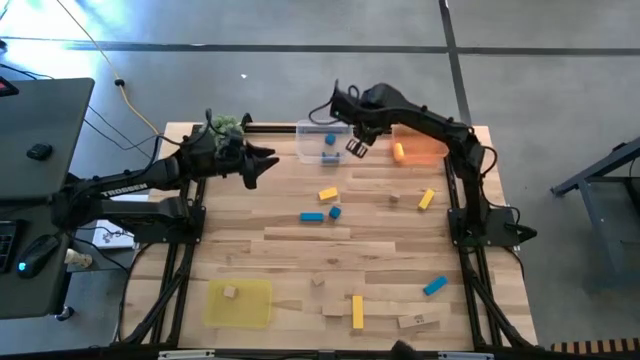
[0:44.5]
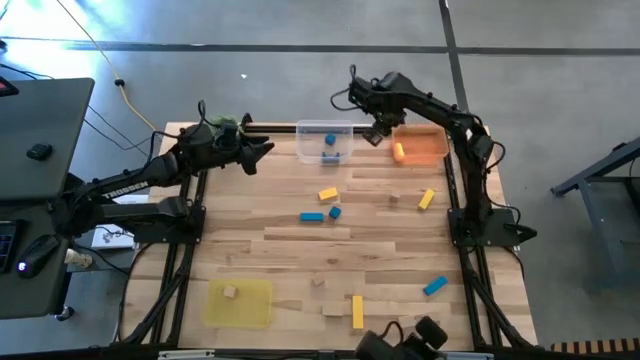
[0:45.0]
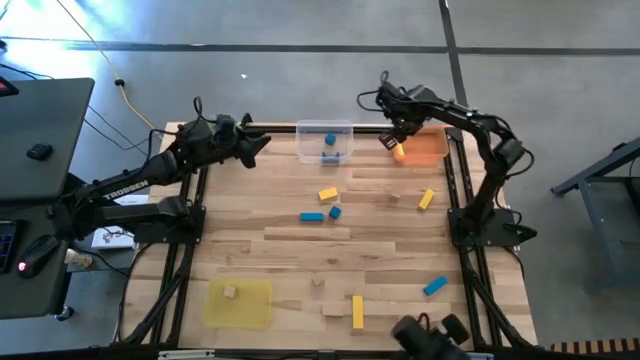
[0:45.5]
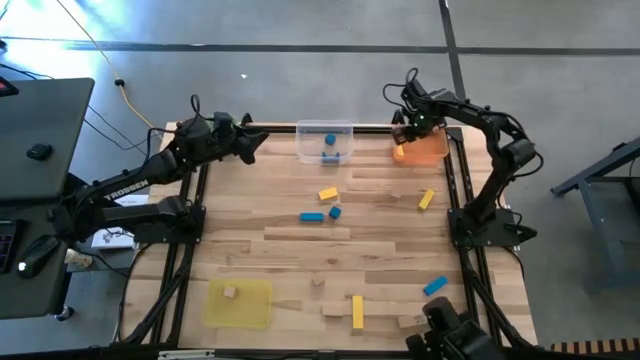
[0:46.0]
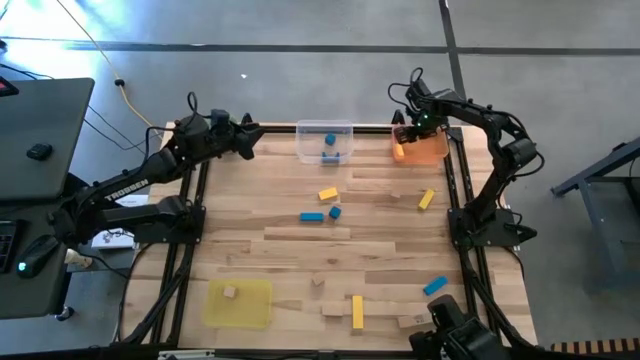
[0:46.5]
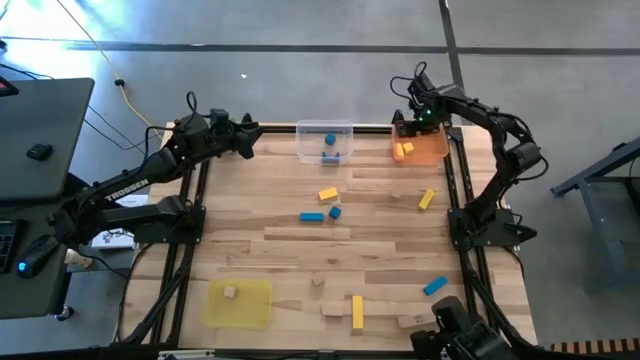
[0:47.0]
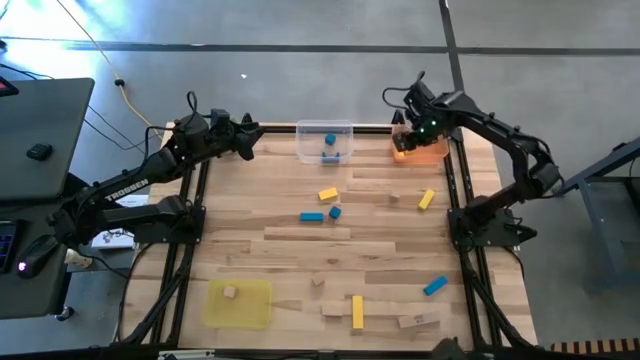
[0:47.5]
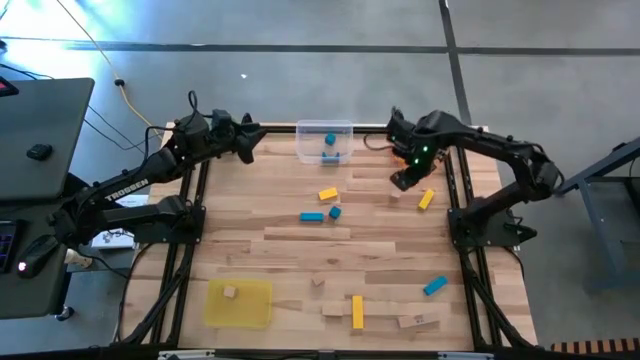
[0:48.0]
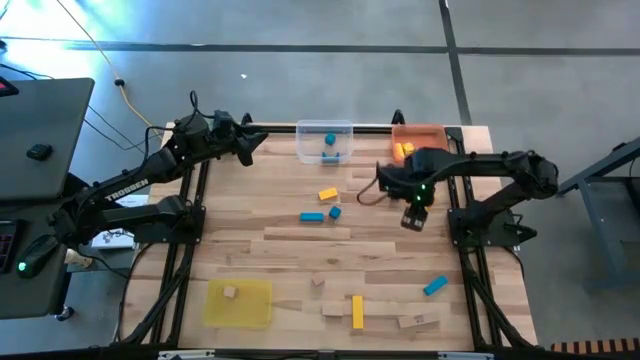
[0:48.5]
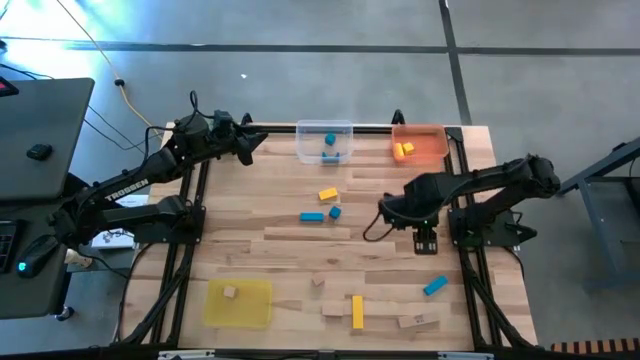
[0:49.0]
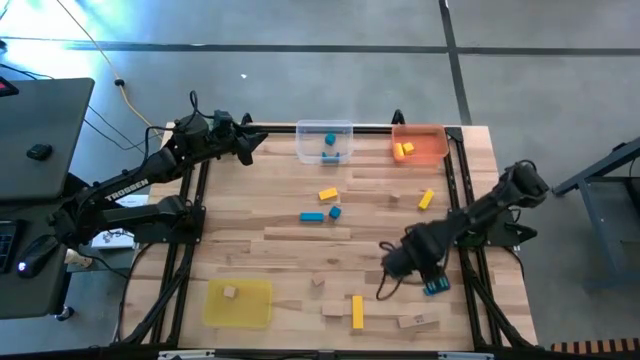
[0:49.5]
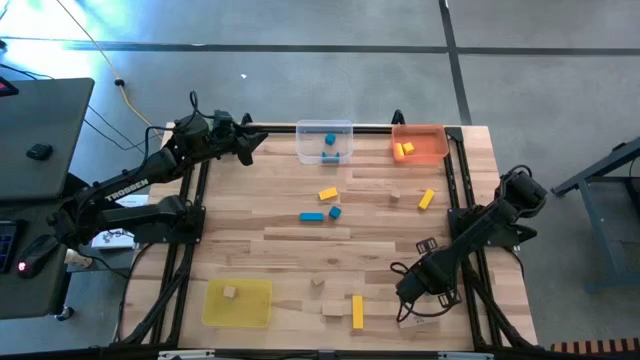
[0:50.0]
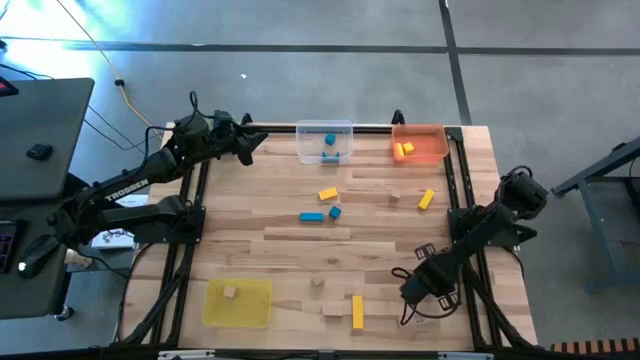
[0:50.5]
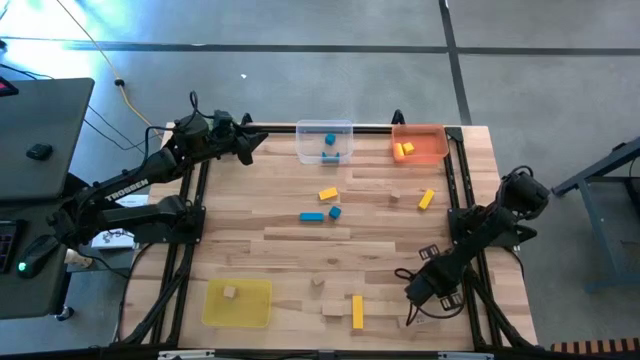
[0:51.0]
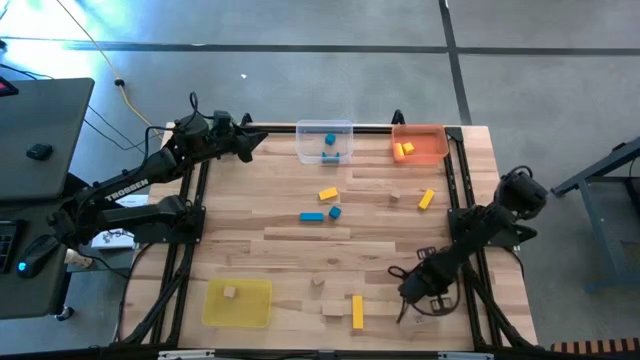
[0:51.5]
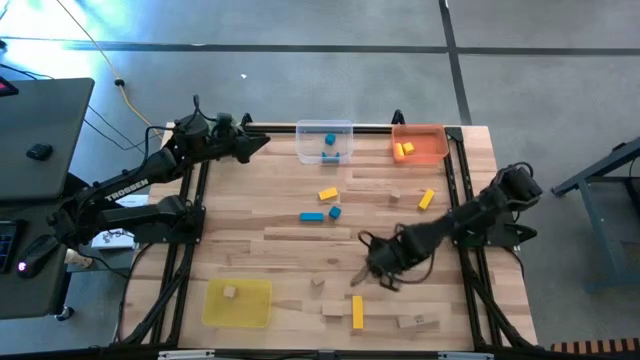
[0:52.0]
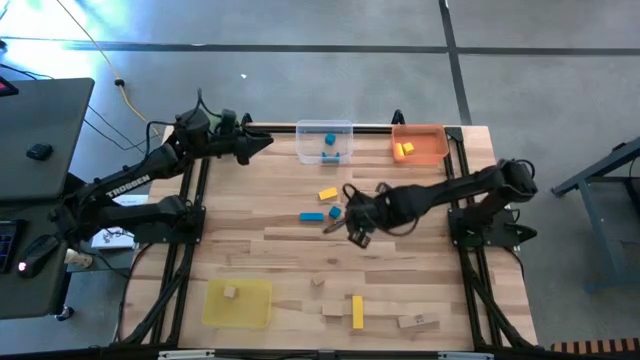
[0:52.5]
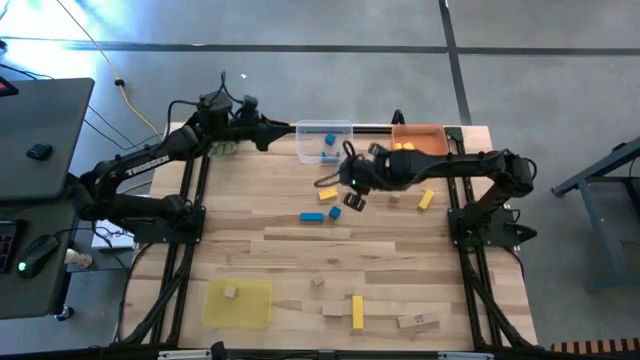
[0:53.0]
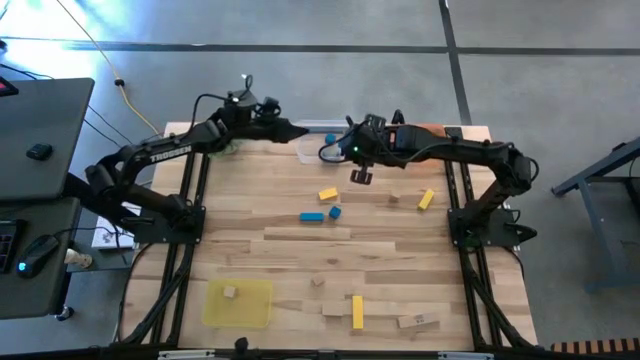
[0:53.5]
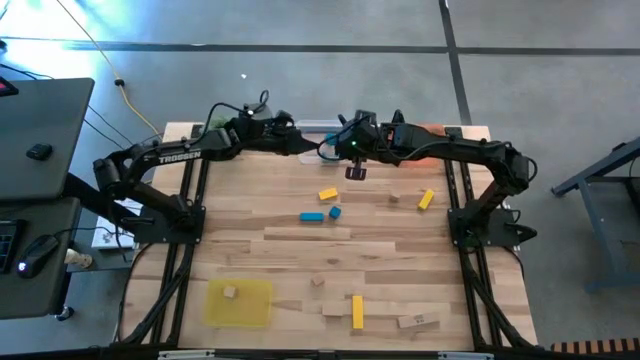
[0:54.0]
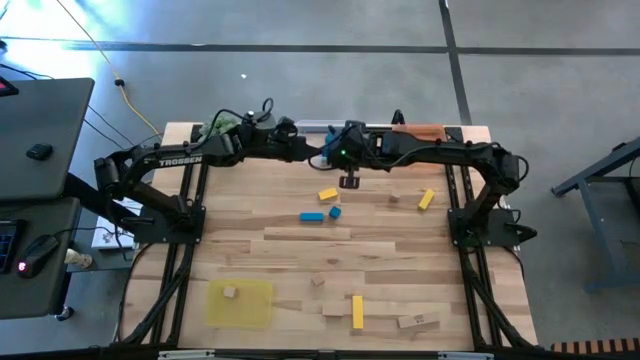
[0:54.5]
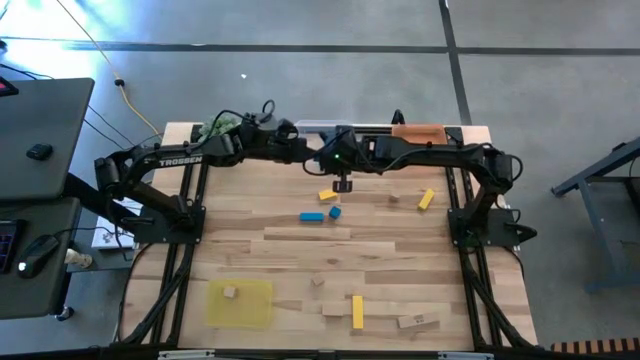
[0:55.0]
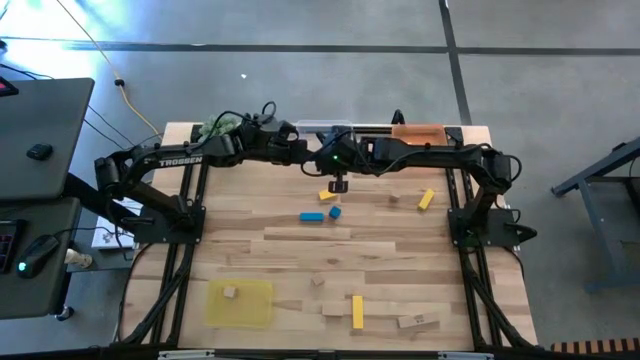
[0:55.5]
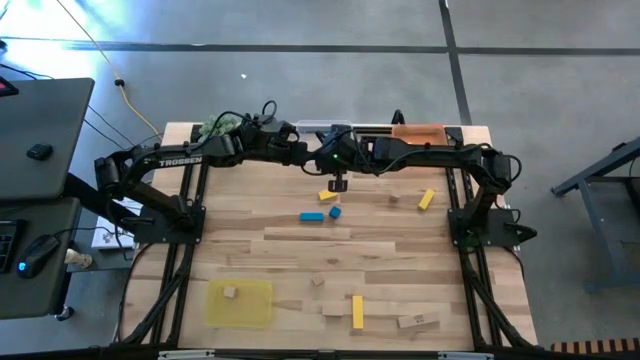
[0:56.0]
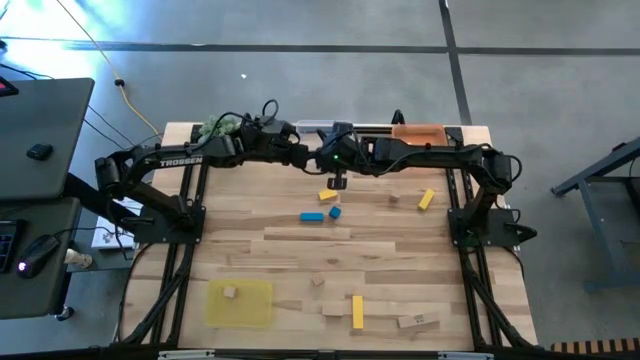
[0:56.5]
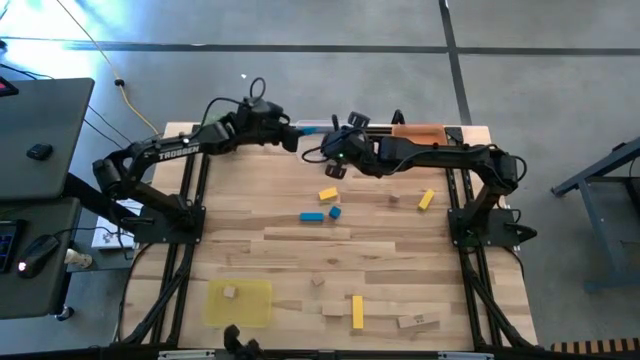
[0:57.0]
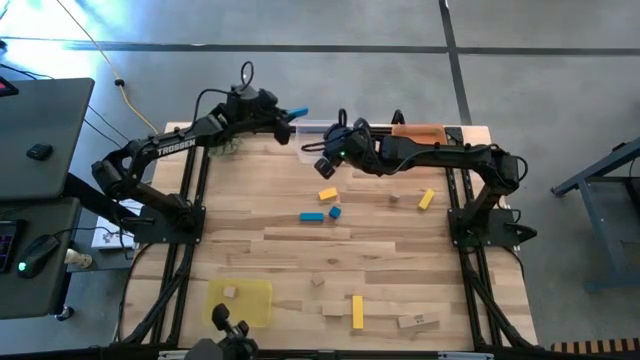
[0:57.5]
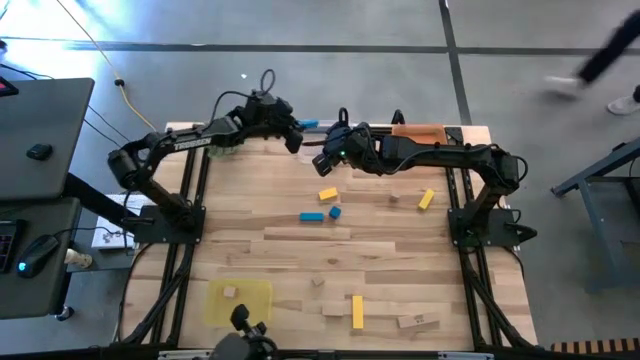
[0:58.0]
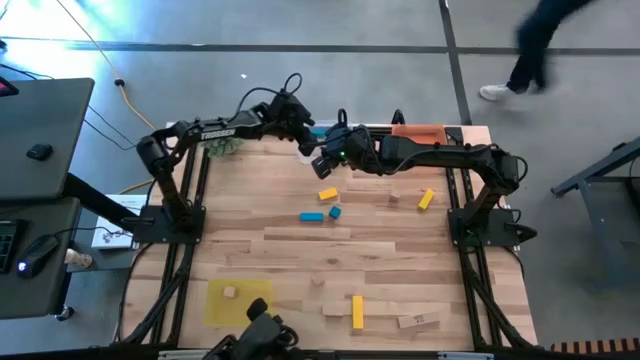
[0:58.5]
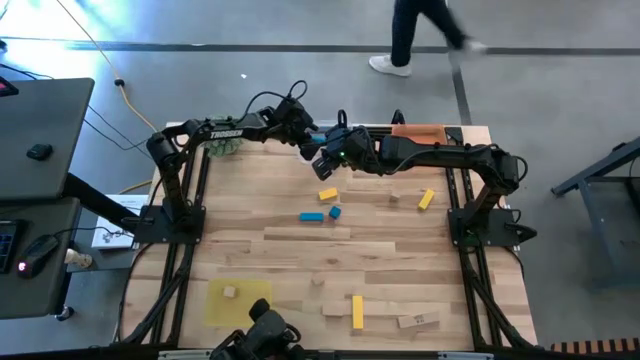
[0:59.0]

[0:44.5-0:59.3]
Task: Sort & place blocks by color
Put the blue block into the transparent bin

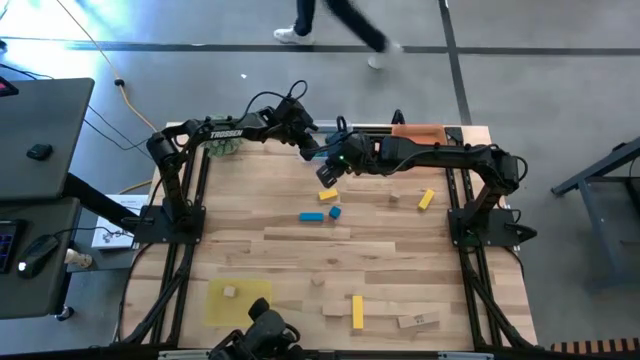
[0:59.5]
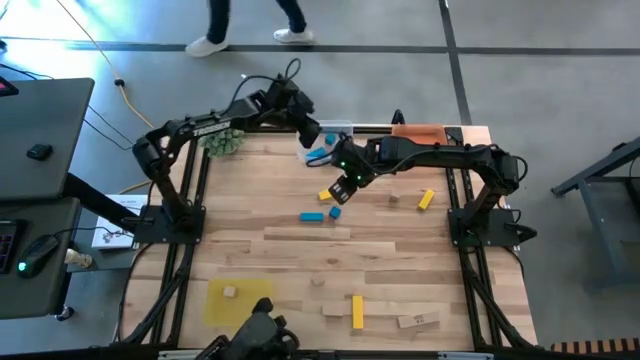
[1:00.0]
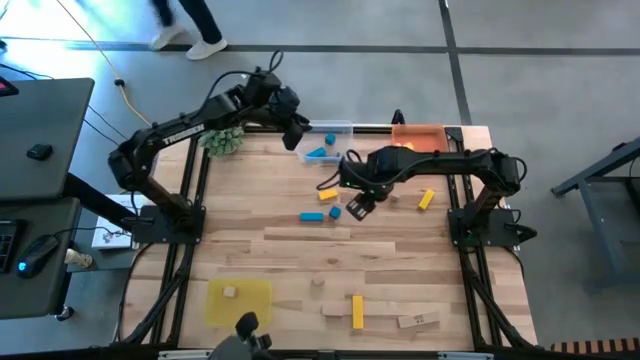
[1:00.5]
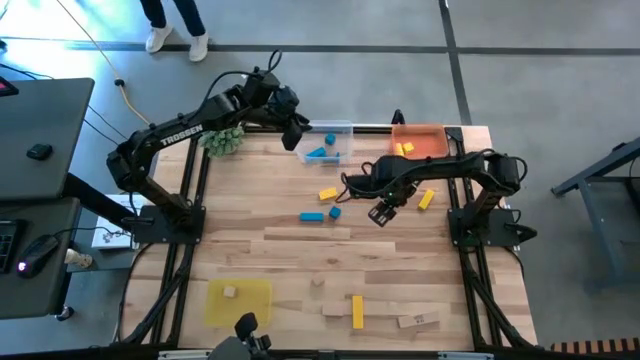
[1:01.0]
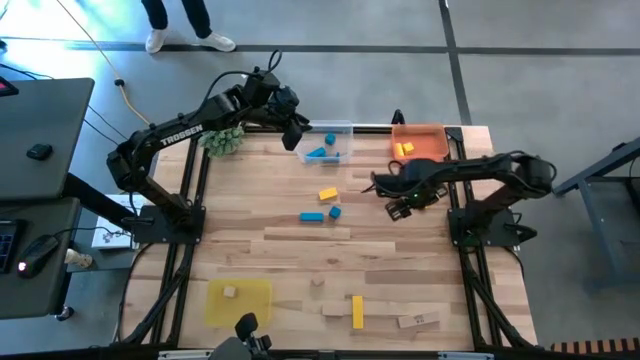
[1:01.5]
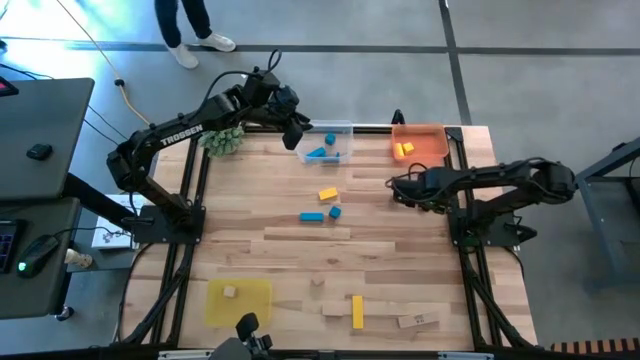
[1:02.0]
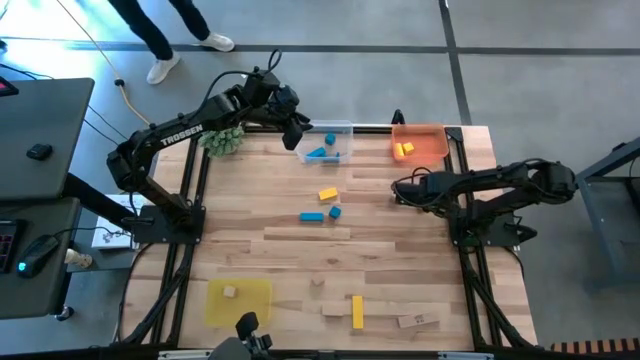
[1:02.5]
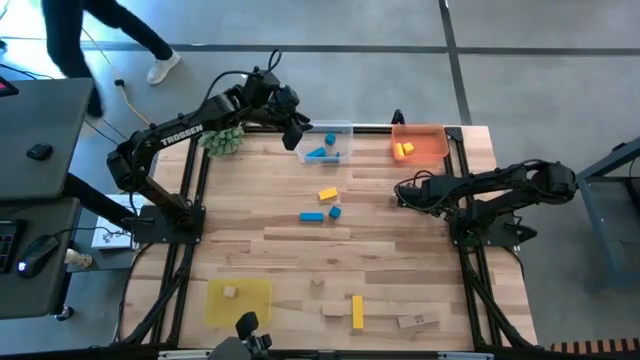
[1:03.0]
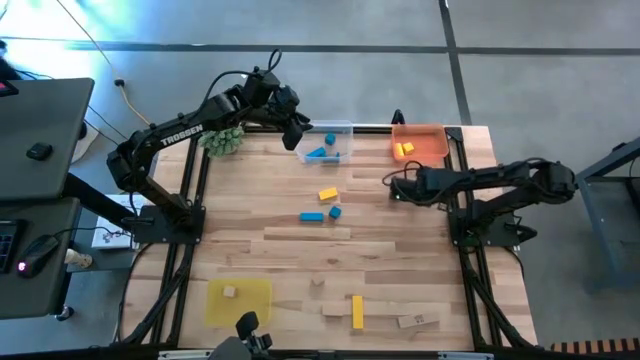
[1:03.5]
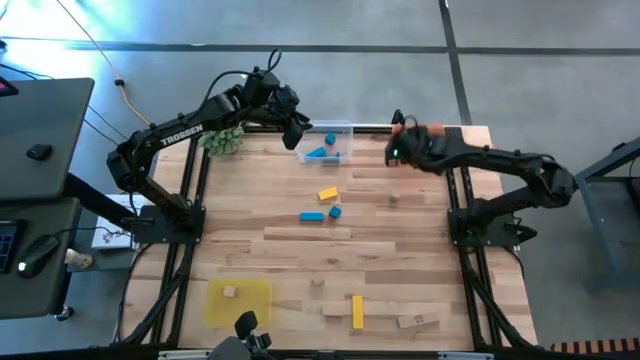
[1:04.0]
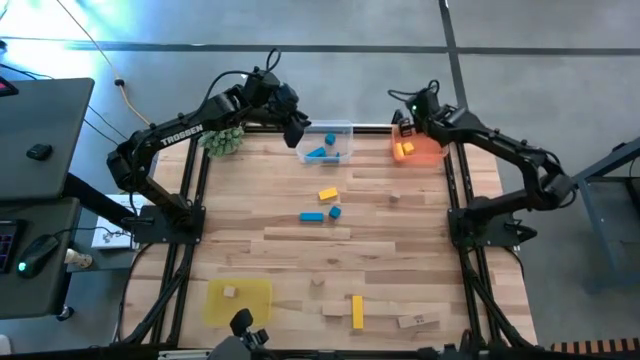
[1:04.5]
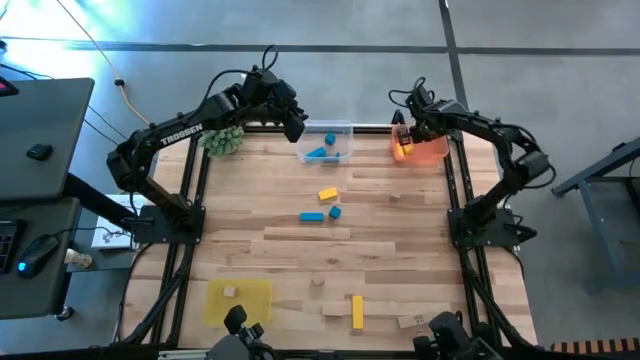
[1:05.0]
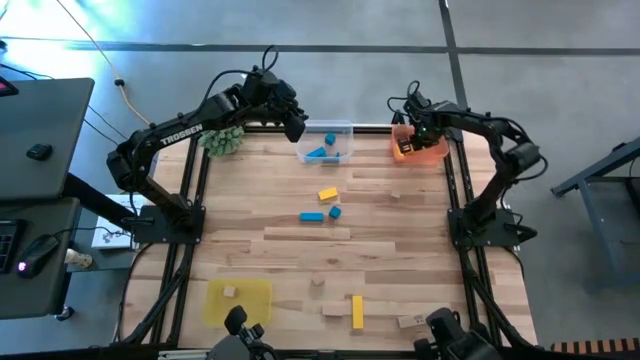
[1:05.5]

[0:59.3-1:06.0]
Put the yellow block into the orange bin
